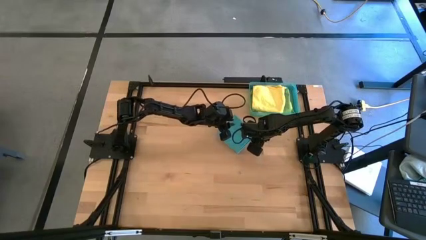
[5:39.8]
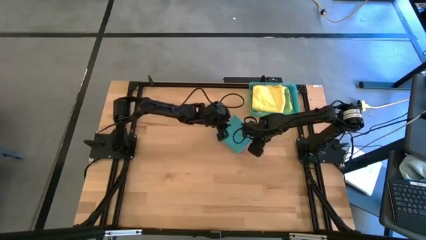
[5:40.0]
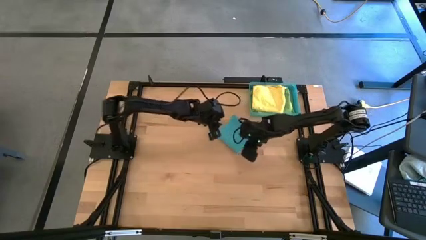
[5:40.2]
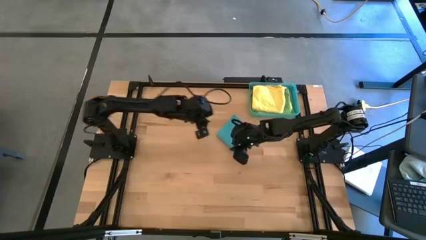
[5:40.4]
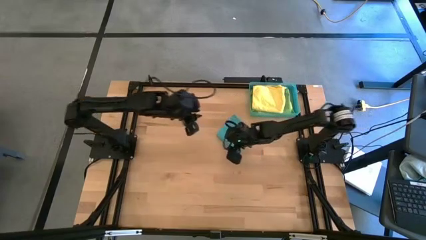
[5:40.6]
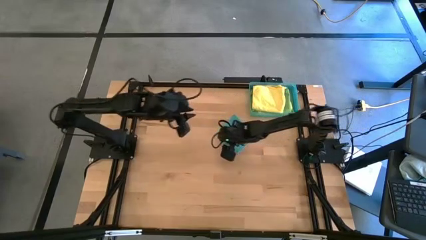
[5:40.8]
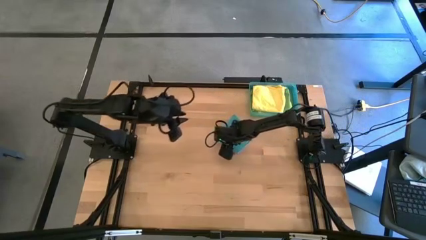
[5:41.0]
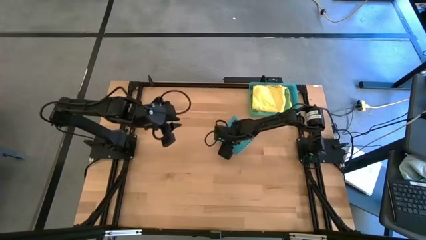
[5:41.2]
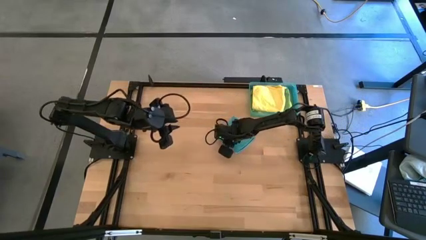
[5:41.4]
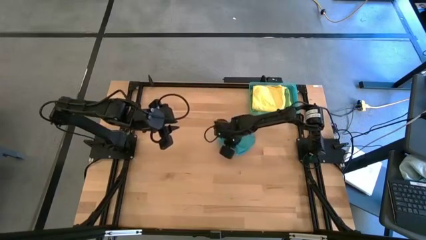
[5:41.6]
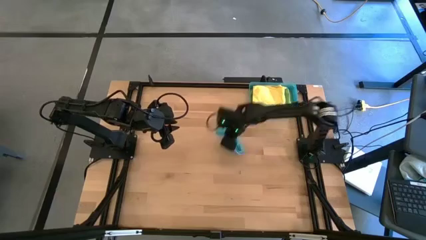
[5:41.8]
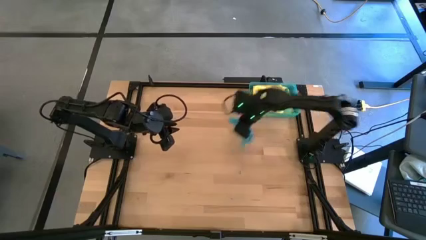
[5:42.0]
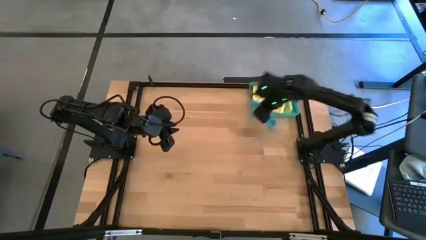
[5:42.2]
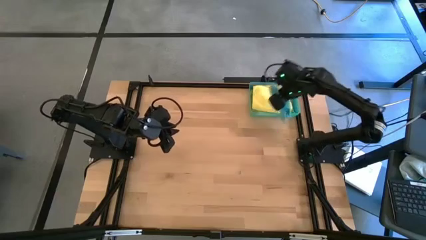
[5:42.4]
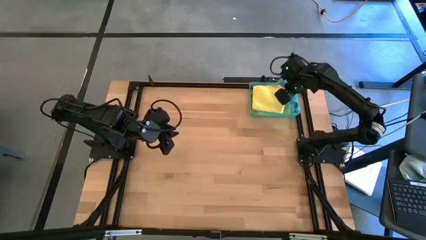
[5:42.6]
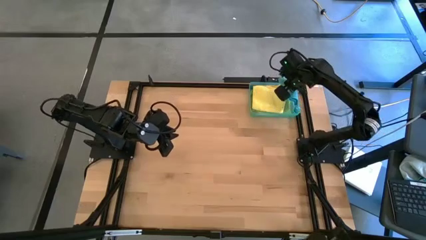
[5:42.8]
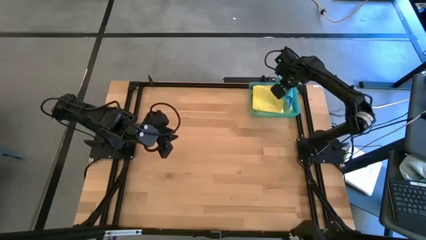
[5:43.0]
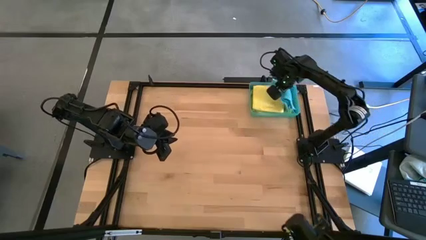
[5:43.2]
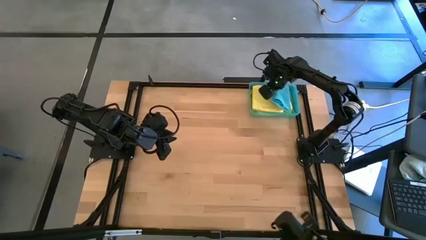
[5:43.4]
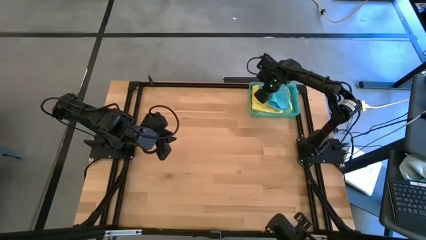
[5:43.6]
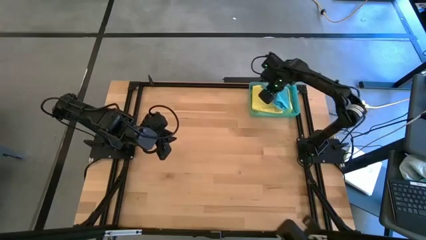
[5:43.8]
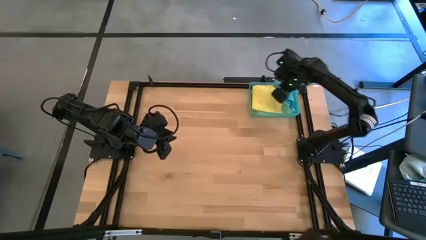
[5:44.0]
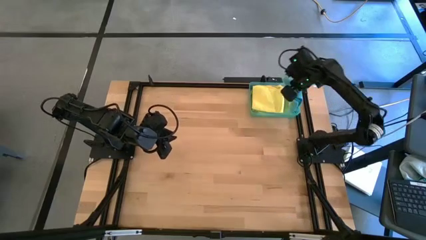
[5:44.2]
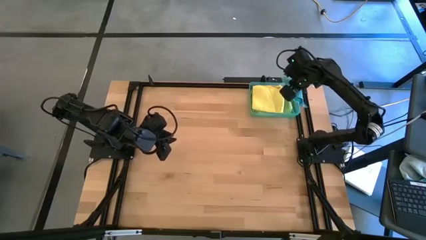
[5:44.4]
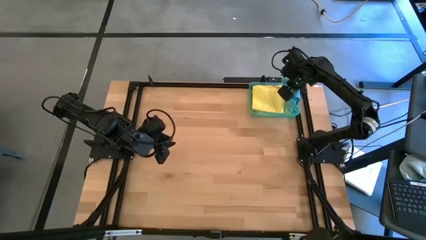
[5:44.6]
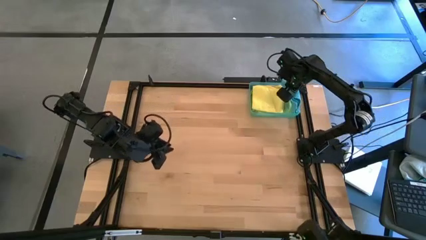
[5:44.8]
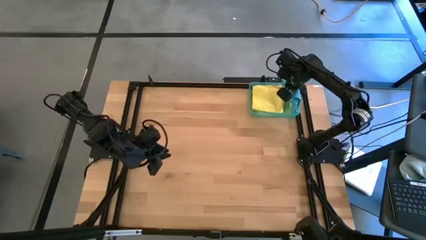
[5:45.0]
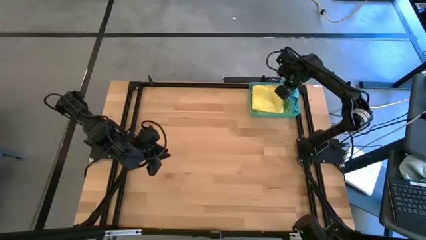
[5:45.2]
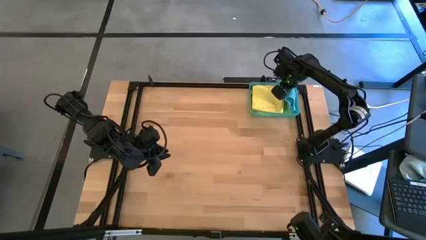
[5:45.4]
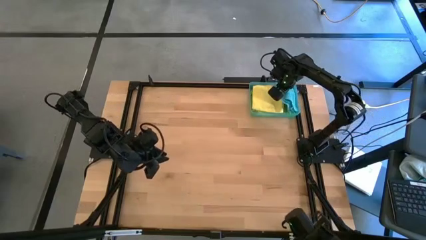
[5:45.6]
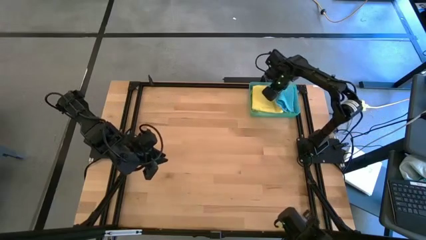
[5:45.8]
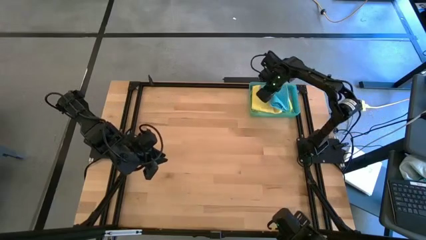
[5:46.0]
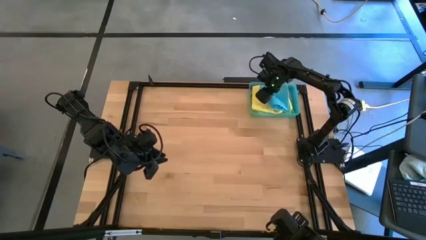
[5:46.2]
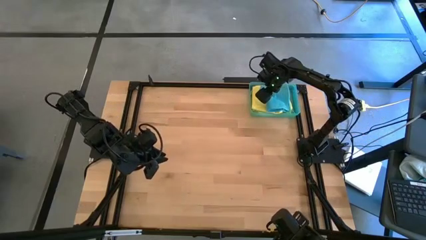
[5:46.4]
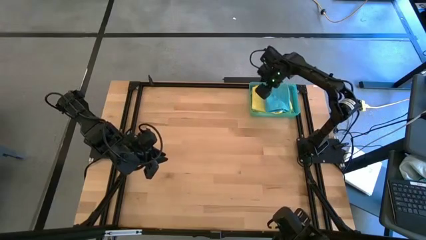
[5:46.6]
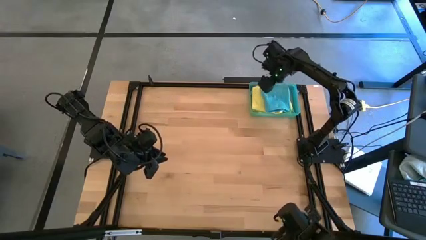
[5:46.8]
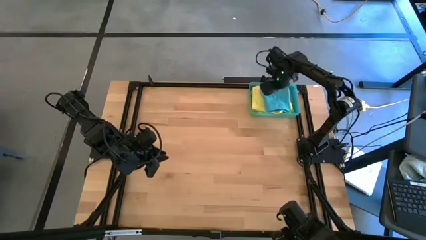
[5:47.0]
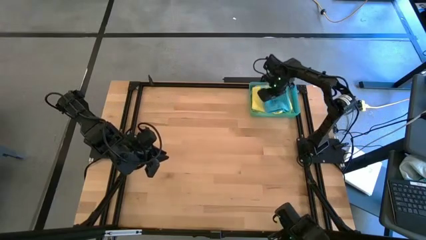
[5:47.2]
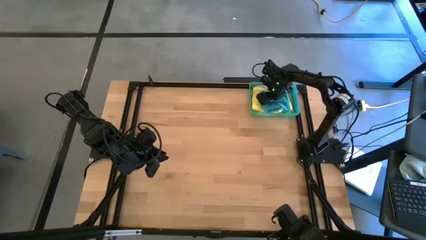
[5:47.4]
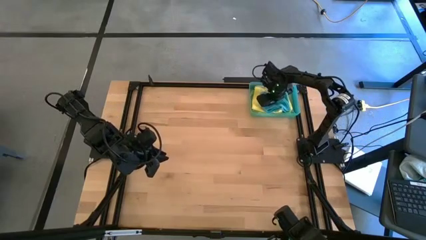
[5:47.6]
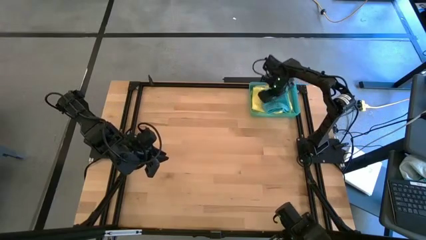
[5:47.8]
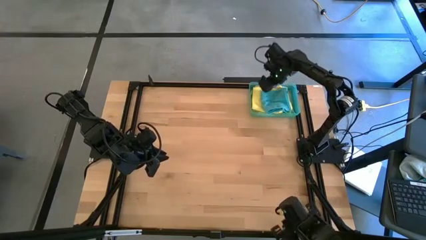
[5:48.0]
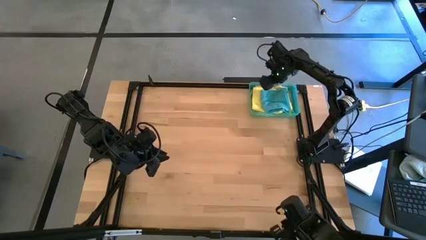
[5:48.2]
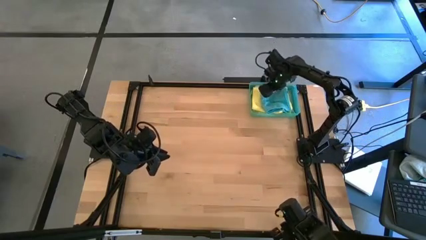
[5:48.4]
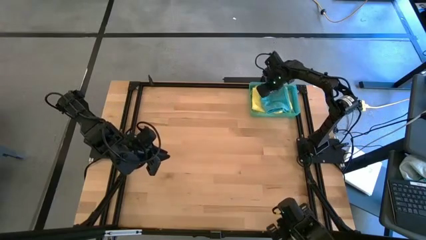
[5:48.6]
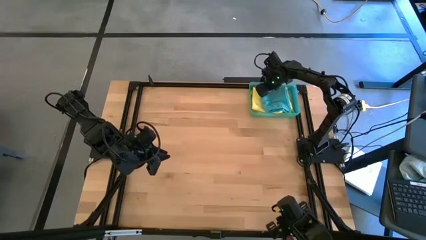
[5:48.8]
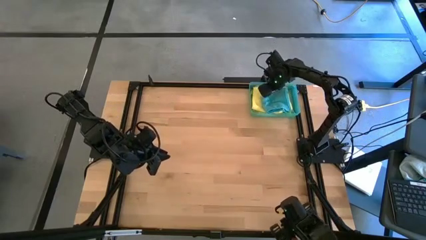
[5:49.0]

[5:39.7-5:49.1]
Task: Fold microfiber towels
Stack the folded blue microfiber cloth on top of the folded yellow microfiber cloth

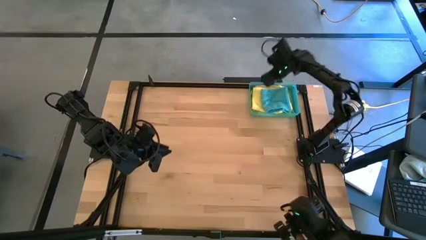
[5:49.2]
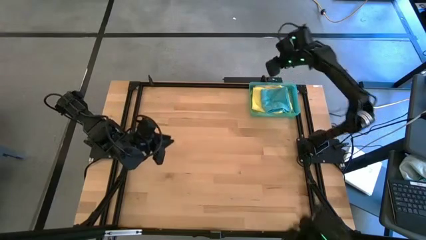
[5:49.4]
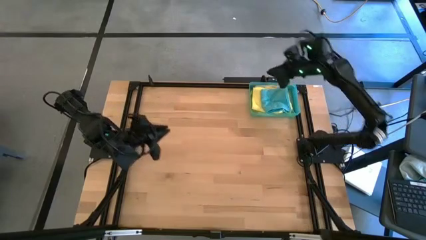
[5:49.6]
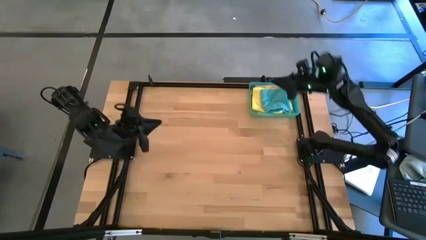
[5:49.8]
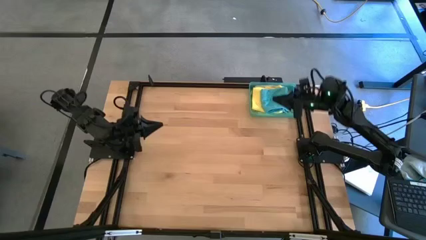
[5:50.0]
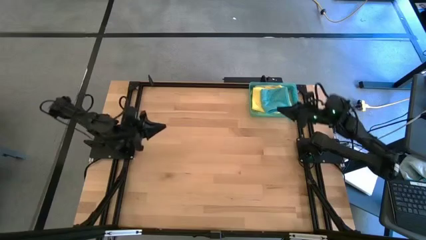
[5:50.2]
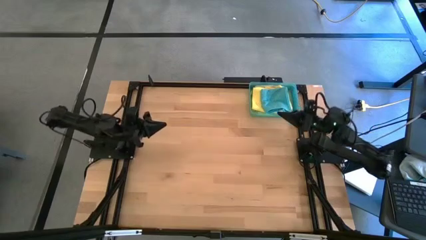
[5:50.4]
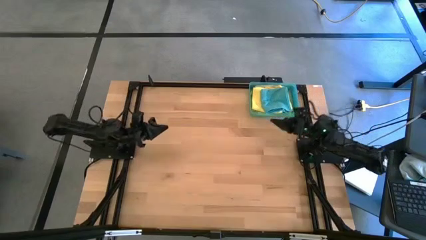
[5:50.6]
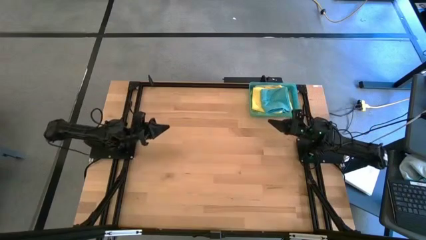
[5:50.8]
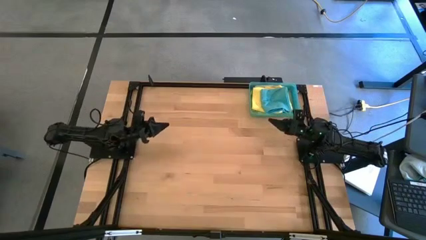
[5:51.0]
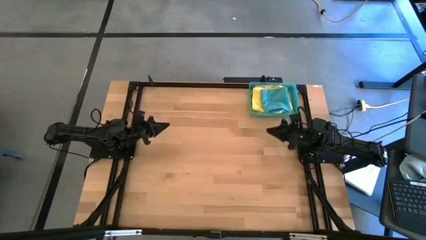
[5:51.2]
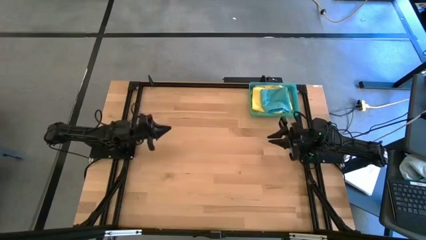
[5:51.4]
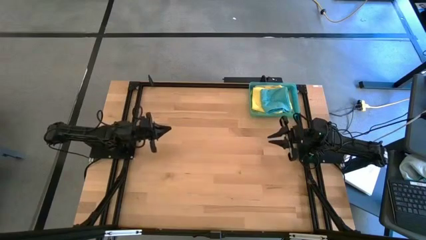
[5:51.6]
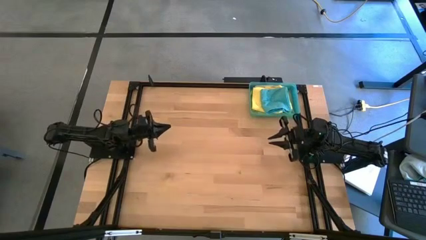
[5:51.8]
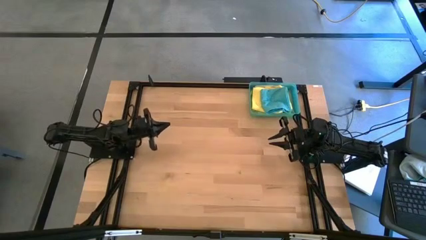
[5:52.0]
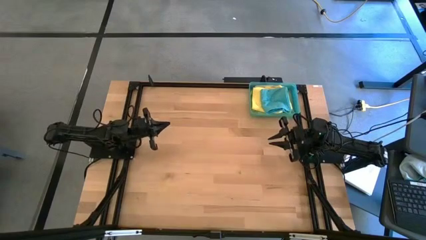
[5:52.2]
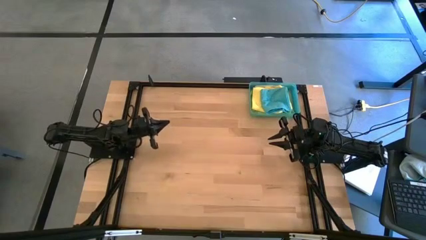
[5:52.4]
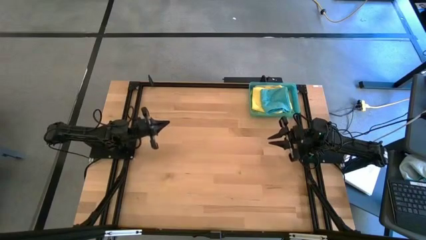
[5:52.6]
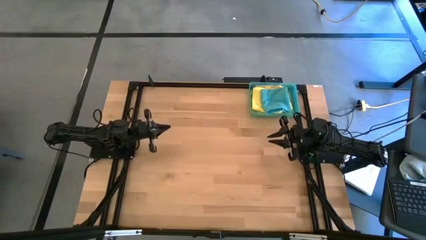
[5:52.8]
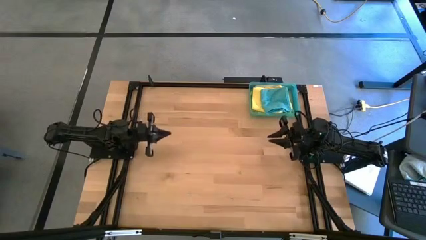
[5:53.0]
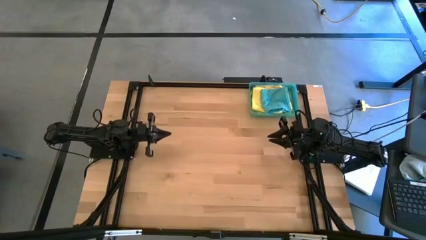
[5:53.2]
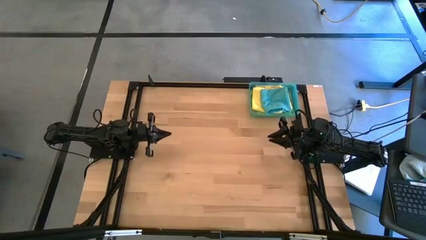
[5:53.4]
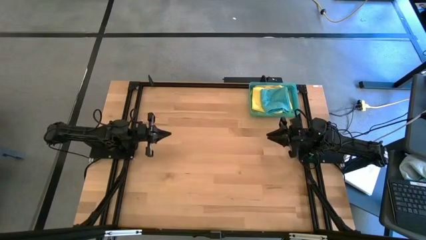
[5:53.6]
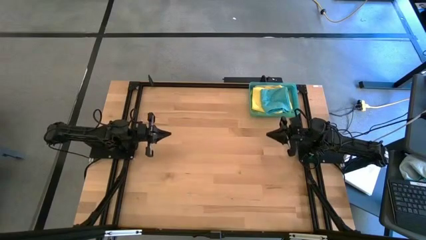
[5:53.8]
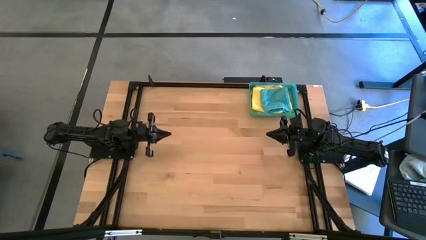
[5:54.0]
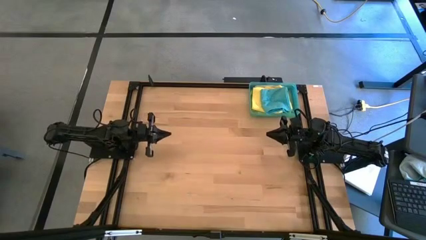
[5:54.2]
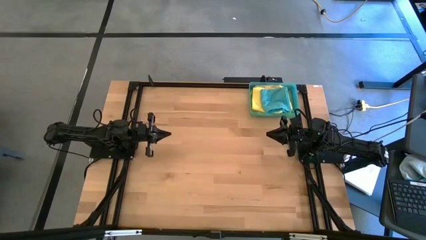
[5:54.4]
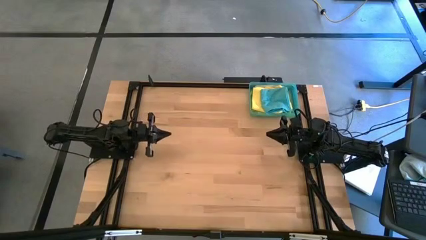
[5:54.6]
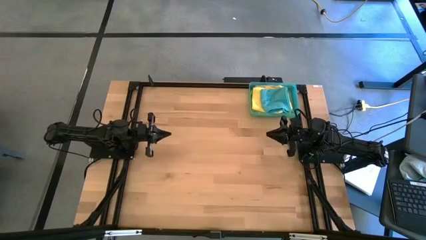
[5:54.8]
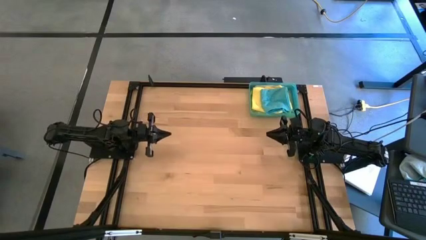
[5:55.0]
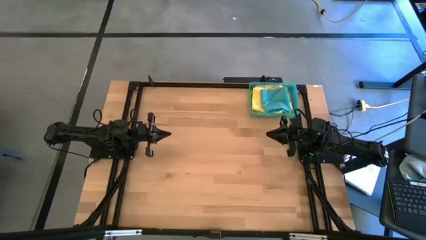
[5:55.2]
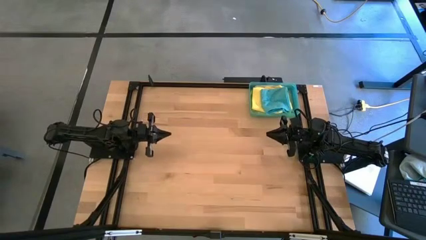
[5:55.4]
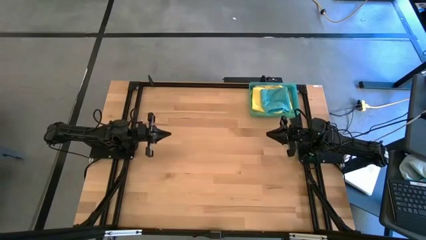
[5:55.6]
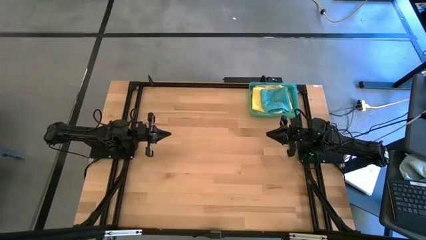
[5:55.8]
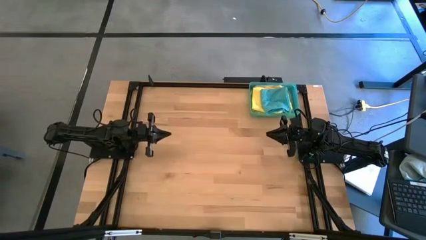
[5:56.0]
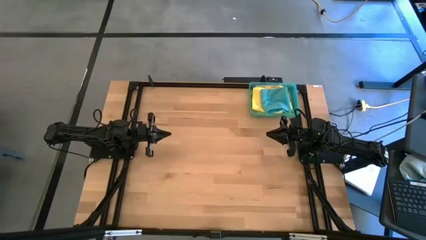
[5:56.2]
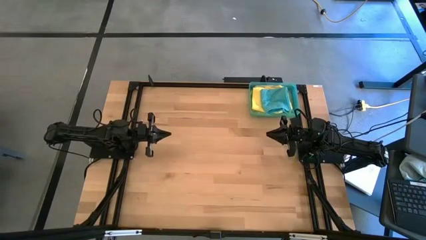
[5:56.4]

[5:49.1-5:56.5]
Return to Home Position
